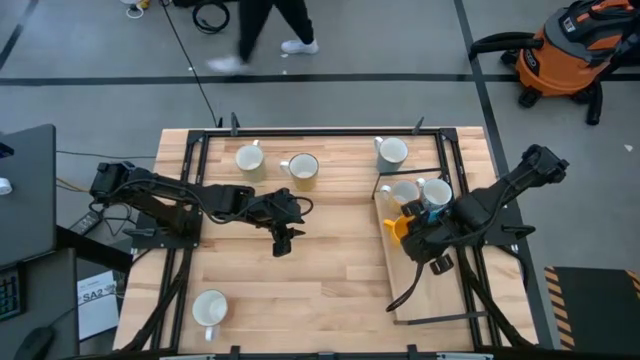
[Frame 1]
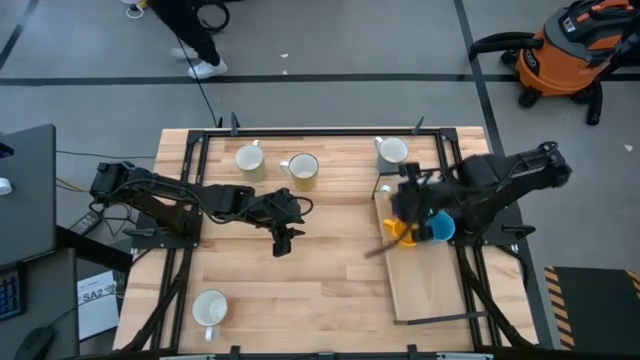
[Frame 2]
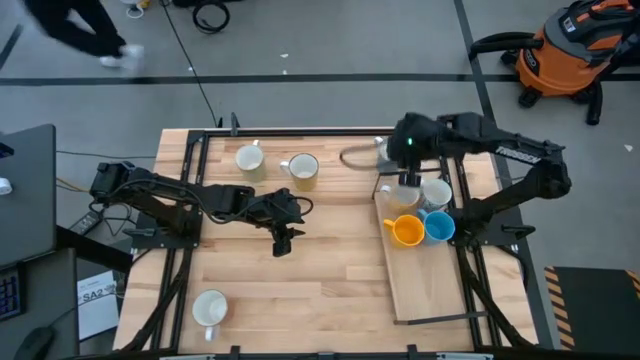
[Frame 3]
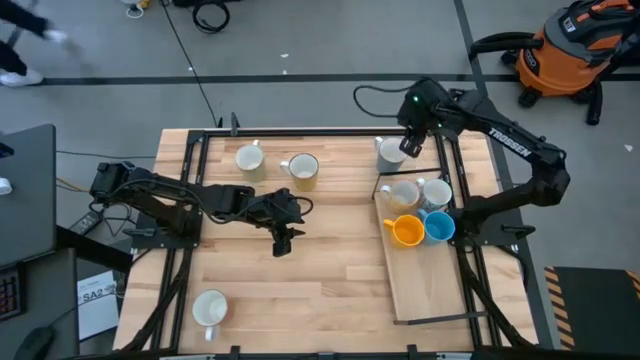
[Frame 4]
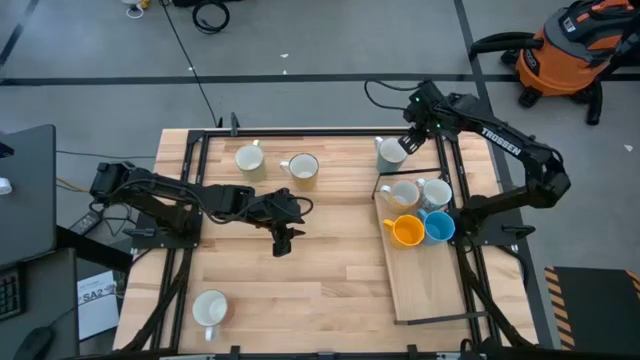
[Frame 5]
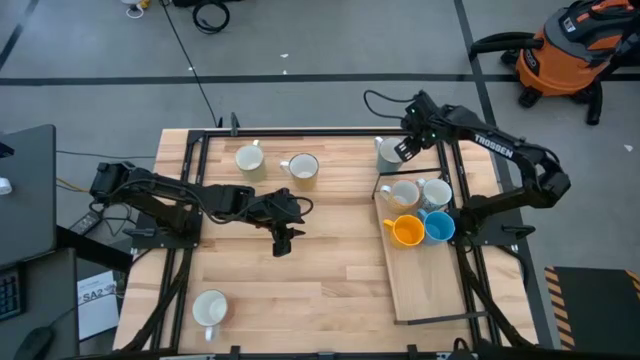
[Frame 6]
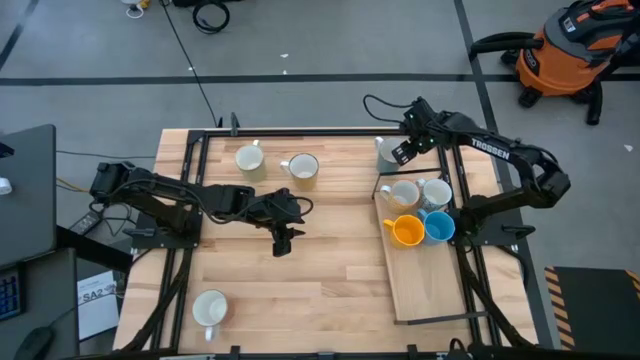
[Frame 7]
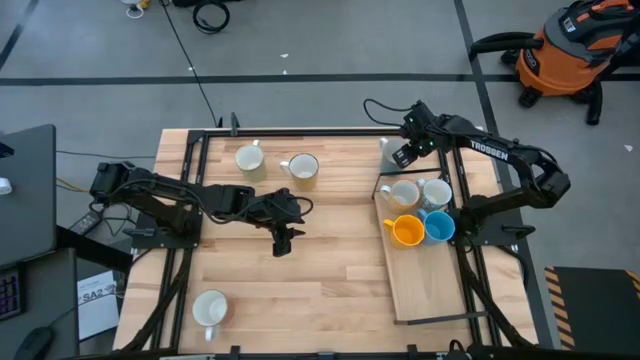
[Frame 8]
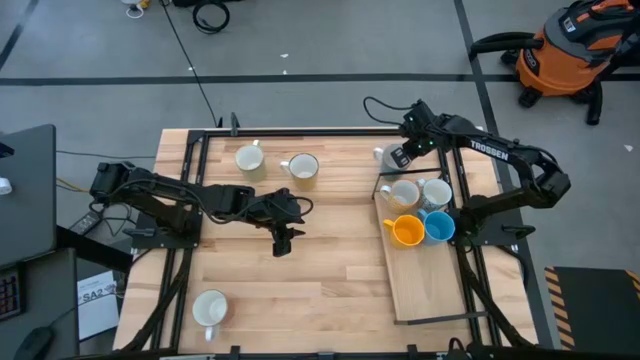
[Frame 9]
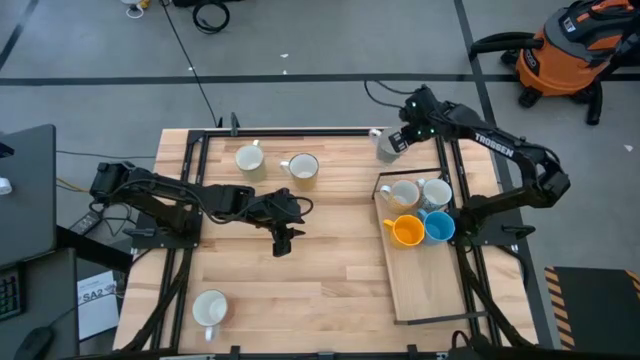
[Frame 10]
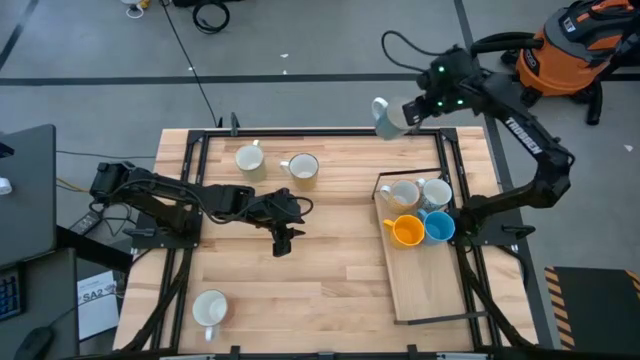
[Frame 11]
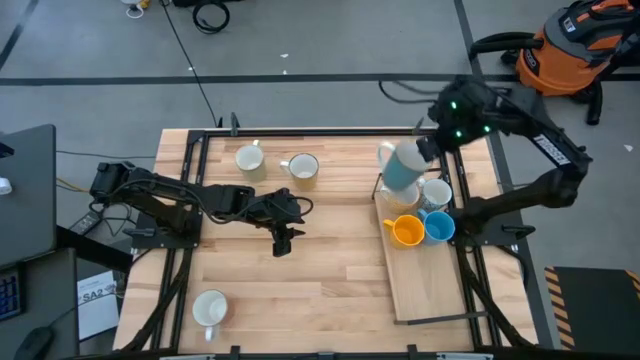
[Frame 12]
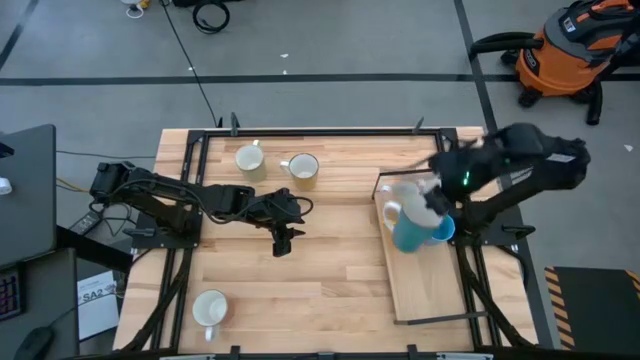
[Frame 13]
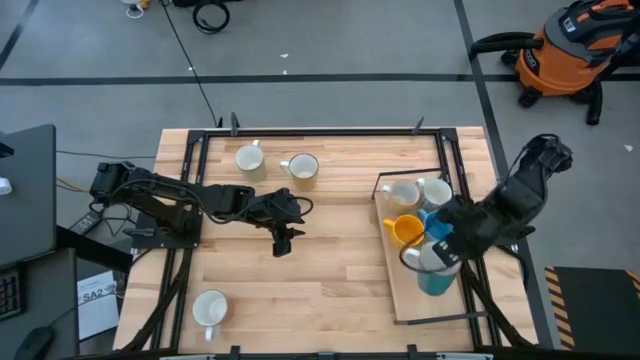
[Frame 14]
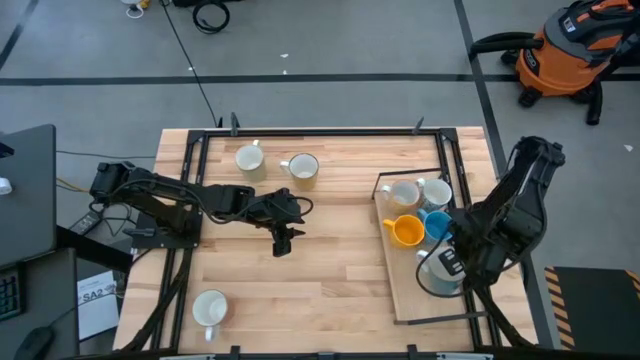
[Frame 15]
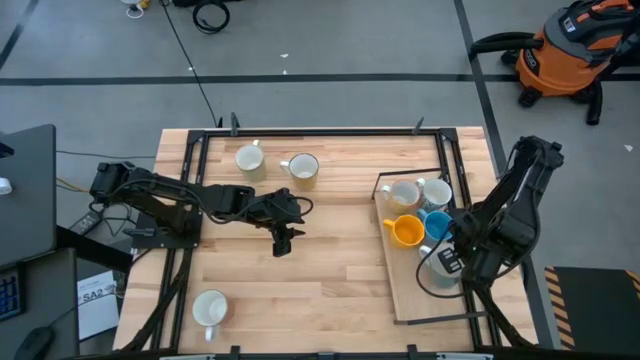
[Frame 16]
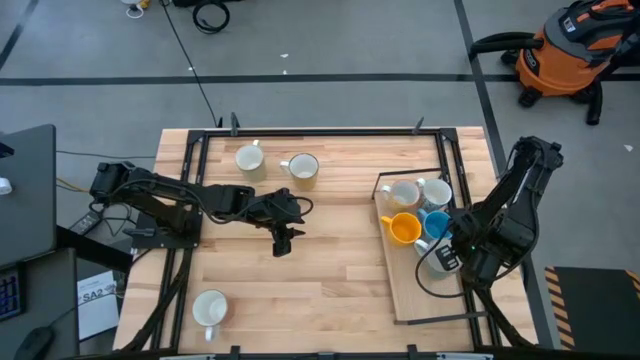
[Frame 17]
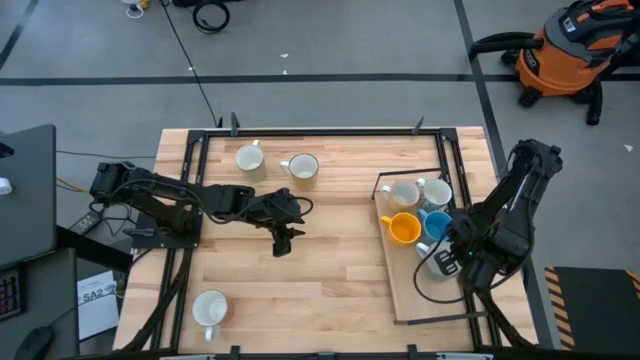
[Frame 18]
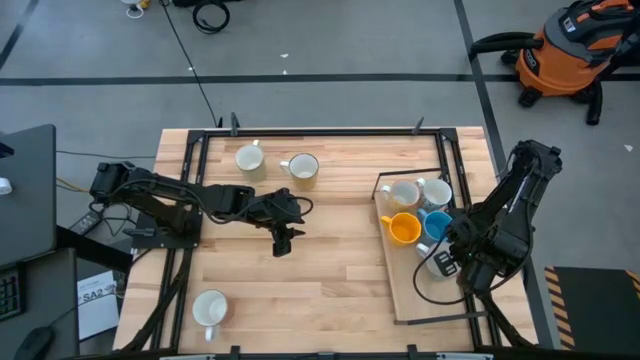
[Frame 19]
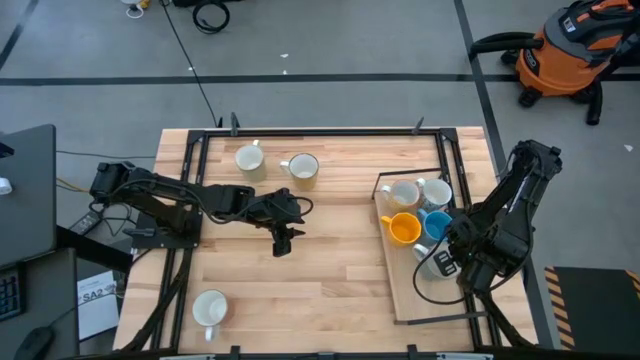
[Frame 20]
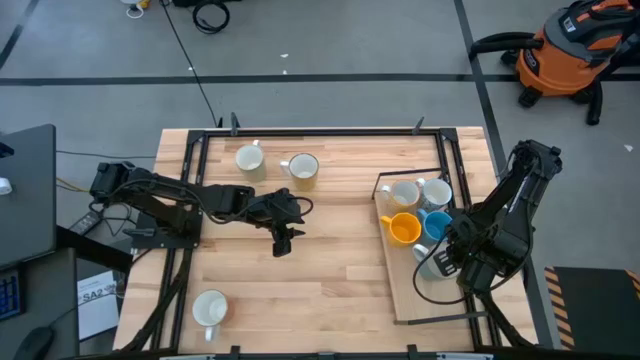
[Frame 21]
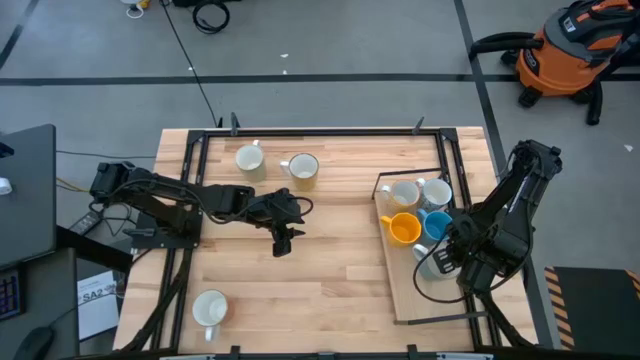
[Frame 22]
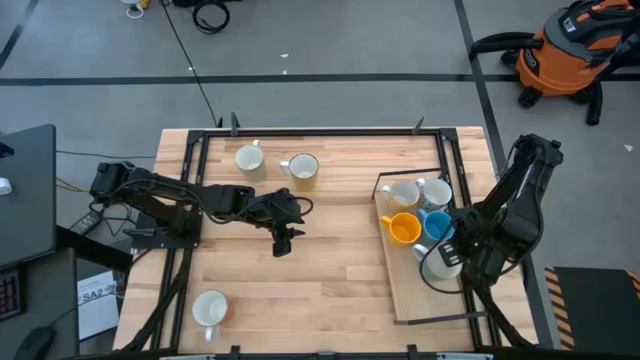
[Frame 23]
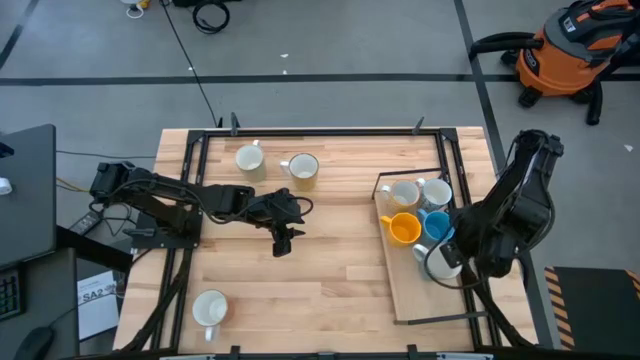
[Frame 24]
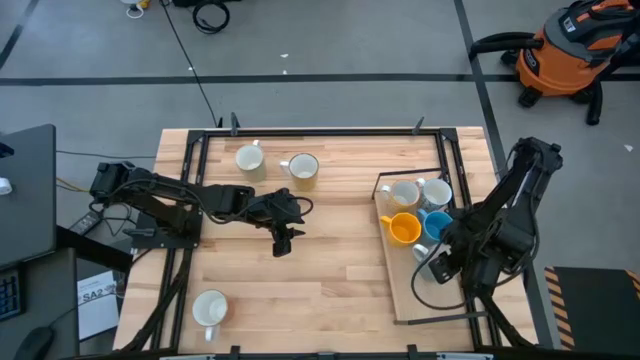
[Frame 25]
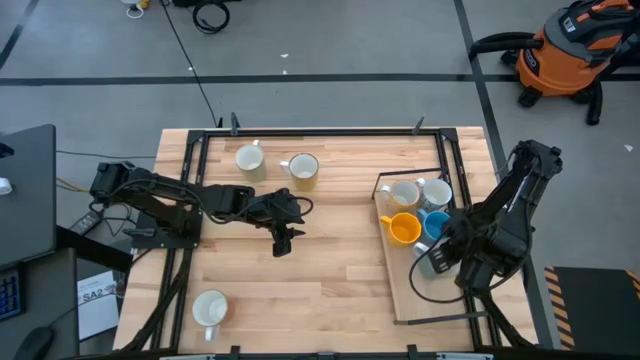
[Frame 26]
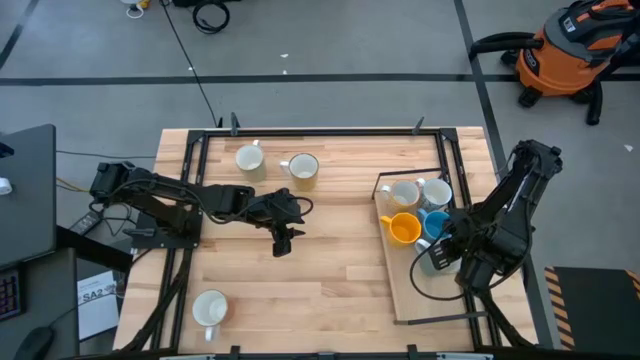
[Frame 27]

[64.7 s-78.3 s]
Task: Place coffee mugs
Put the blue white mug on the shelf
